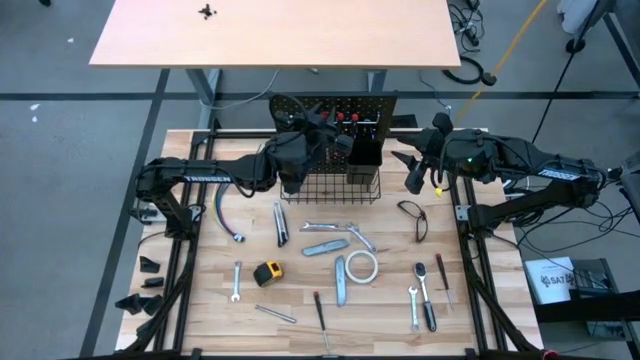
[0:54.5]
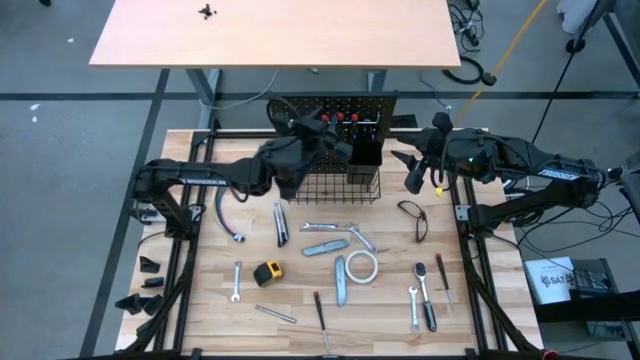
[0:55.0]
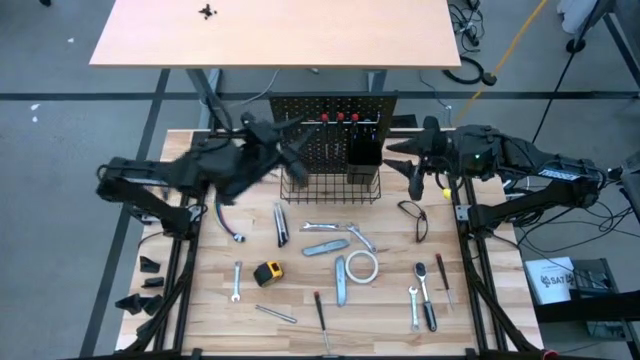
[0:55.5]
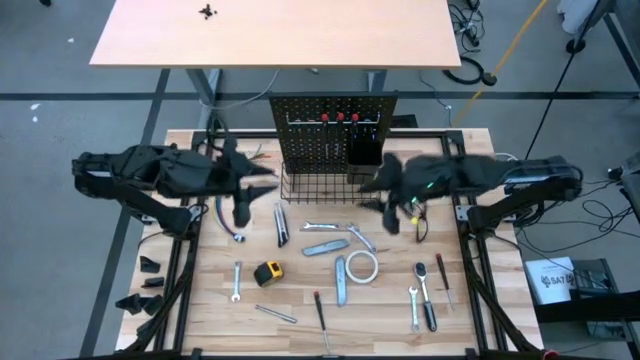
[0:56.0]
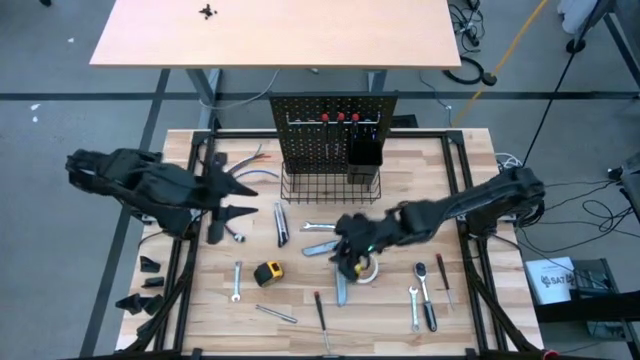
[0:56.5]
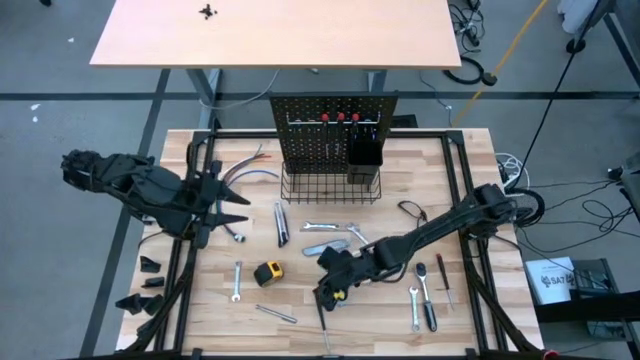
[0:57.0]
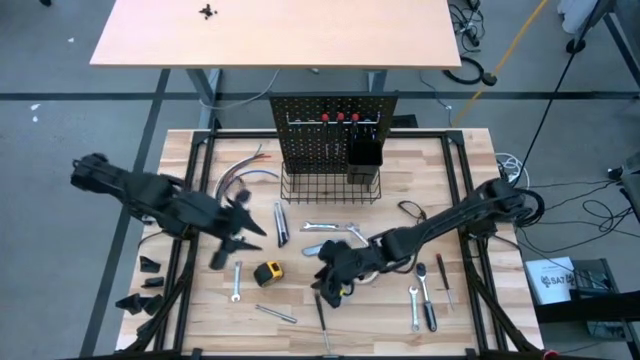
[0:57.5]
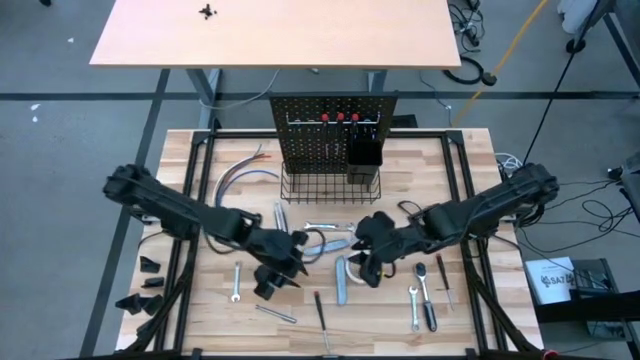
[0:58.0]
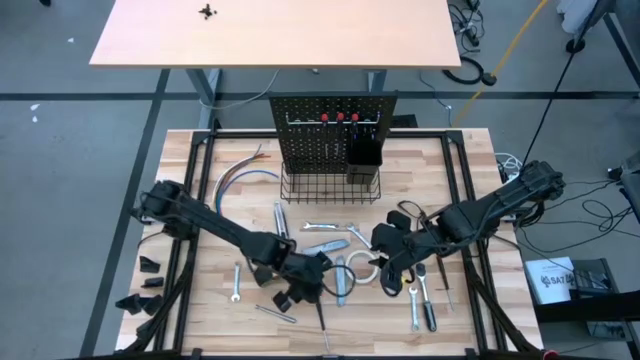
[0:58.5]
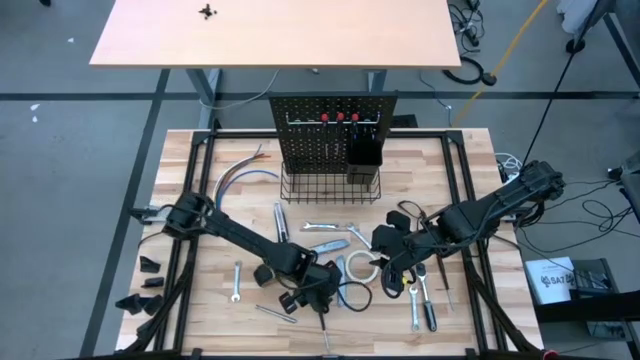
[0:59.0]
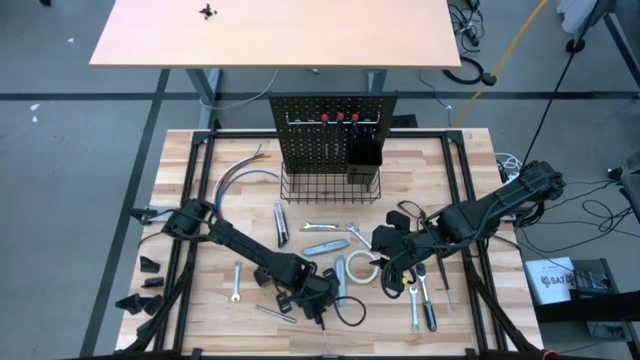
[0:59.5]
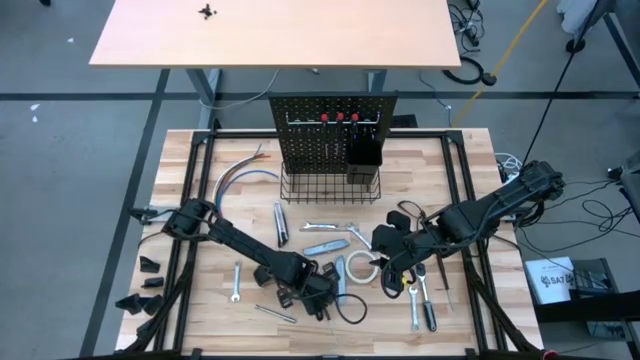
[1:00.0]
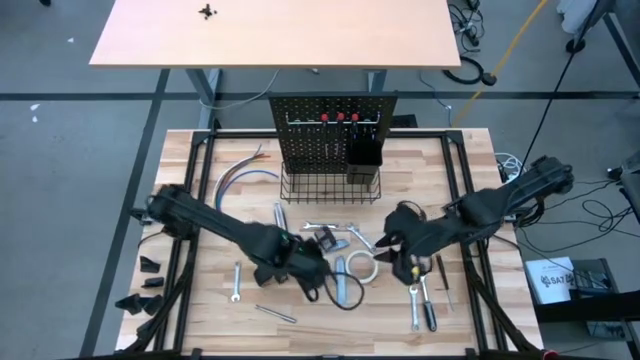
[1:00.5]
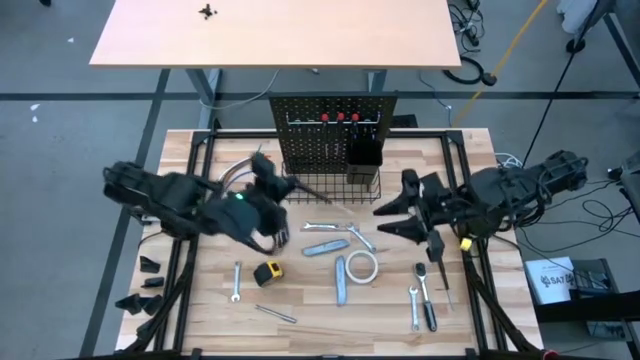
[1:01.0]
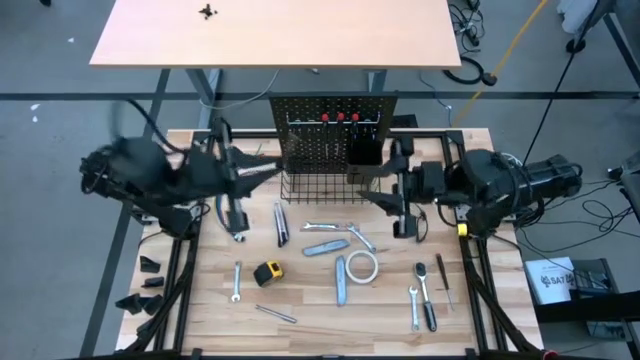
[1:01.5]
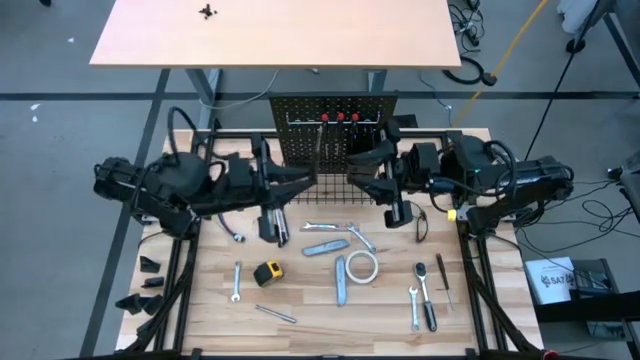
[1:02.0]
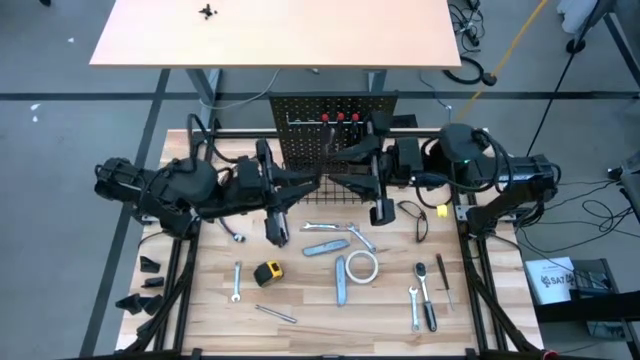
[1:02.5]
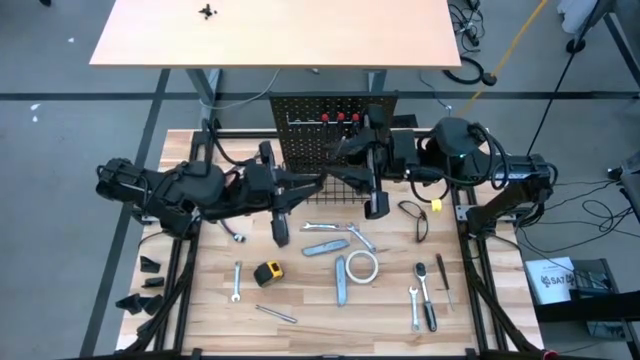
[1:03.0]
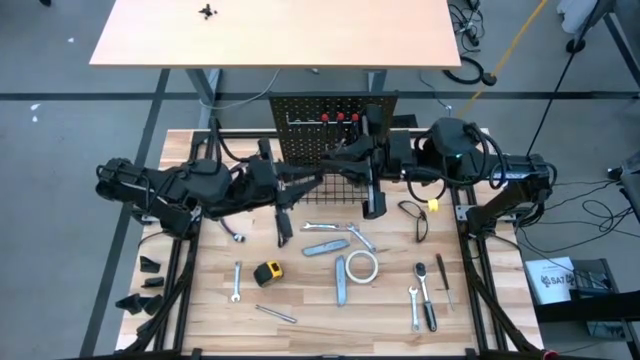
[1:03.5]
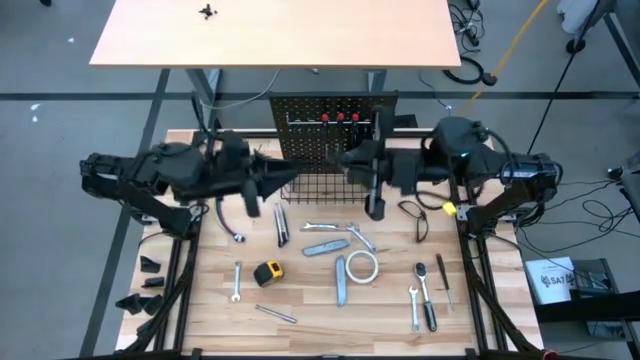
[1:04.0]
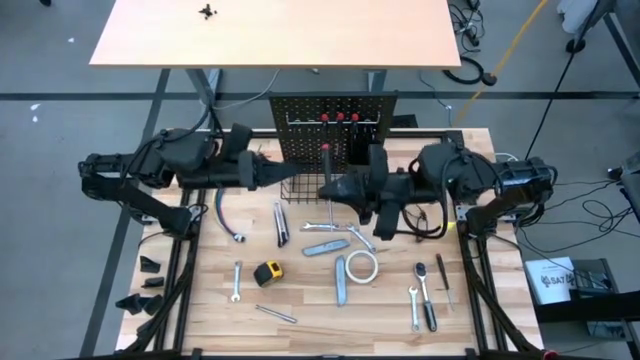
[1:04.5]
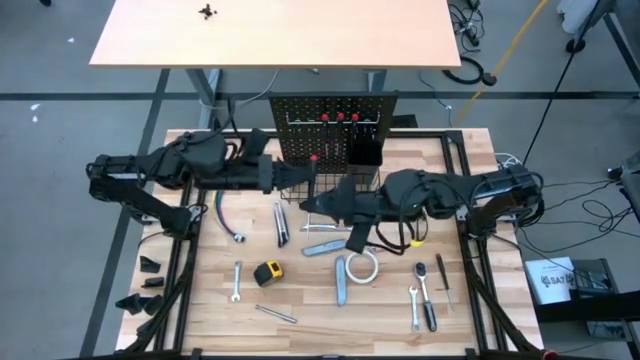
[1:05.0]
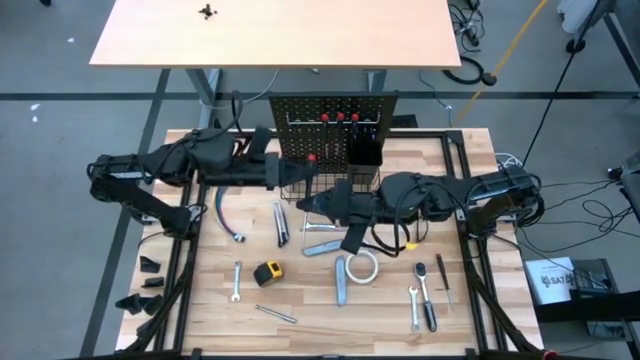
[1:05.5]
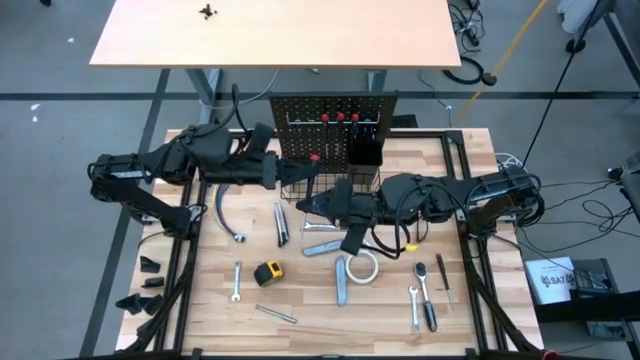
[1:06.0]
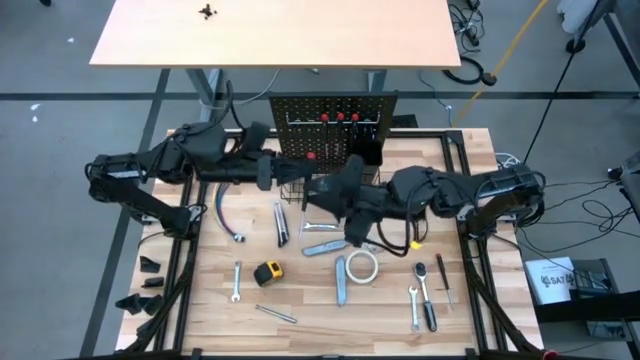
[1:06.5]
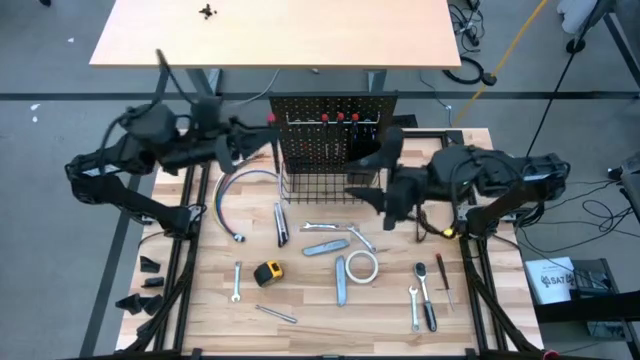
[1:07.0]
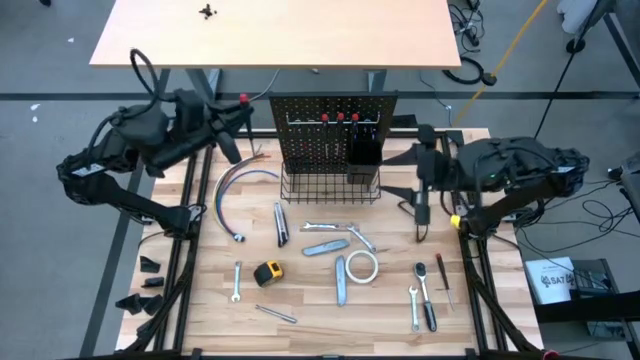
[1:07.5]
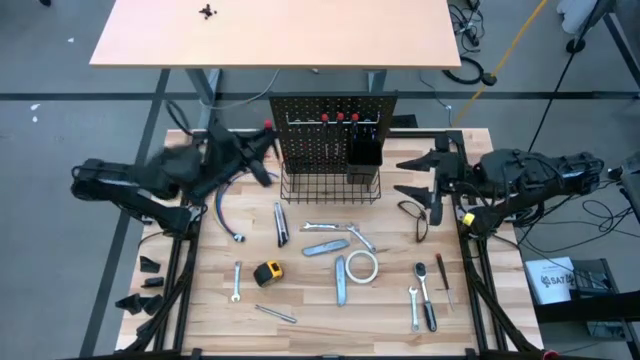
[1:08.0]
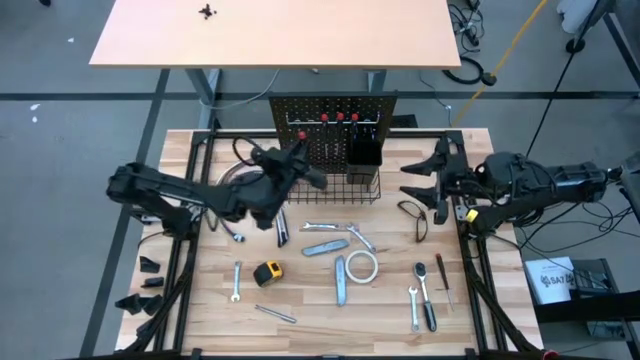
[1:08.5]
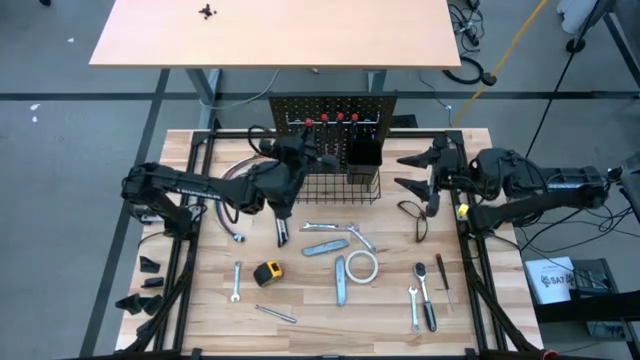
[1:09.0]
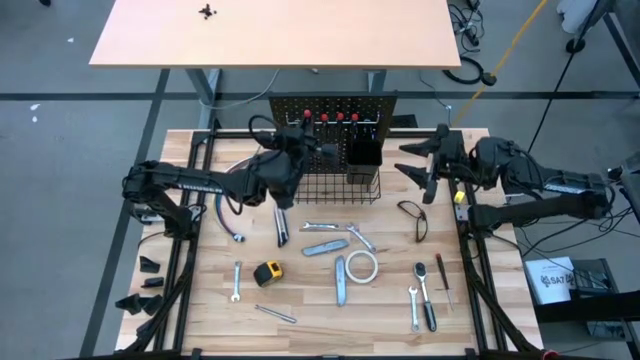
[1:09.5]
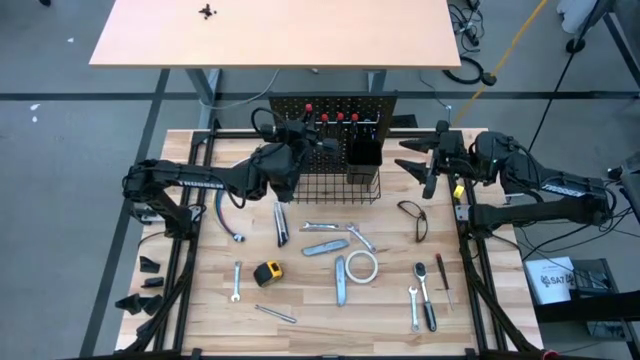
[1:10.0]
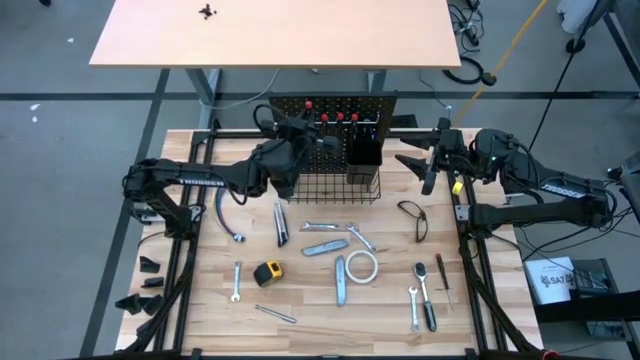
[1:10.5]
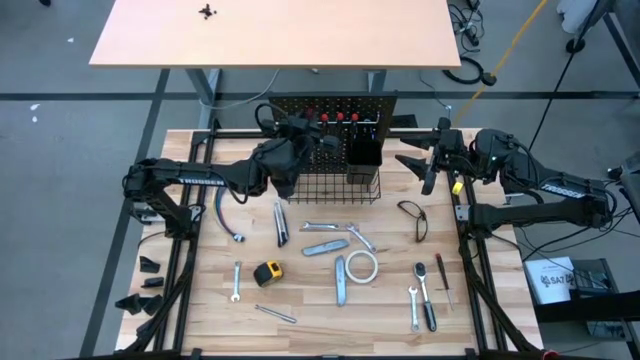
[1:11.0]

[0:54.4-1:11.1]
Task: Hang tools onto peg board
Hang the nut driver onto the pegboard

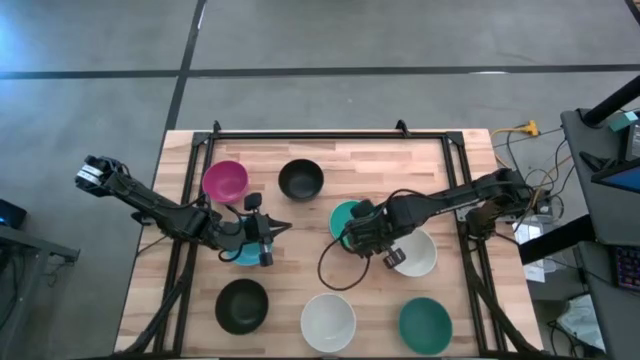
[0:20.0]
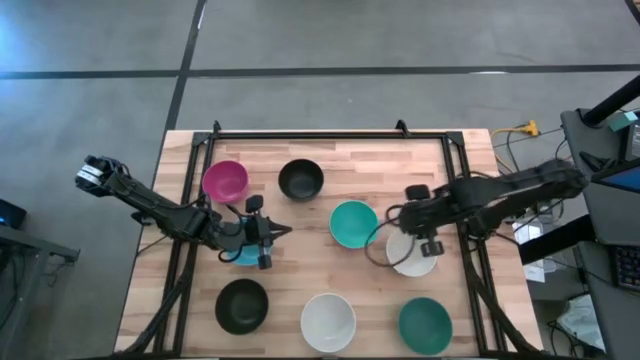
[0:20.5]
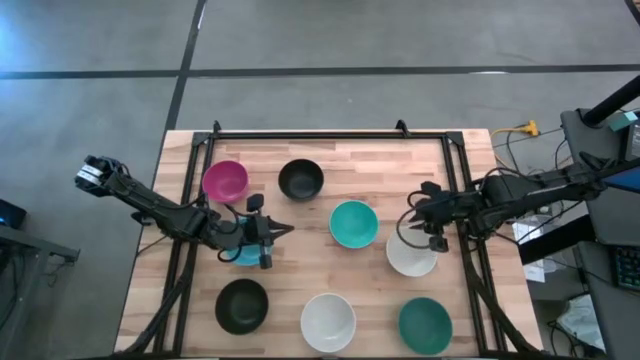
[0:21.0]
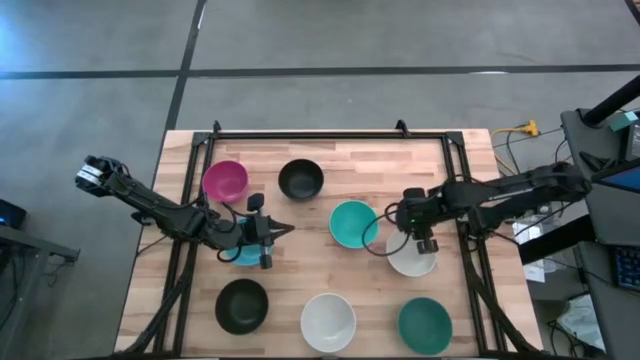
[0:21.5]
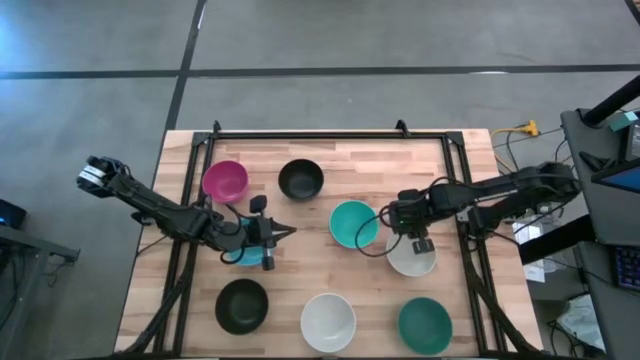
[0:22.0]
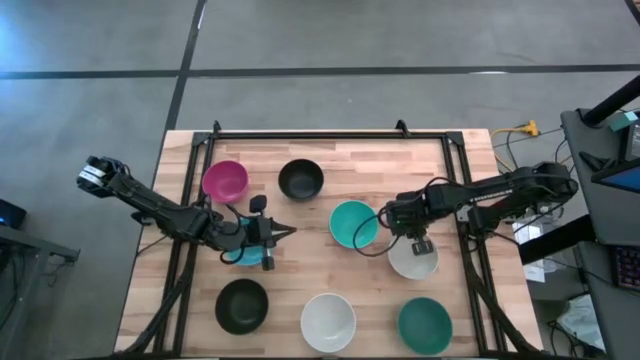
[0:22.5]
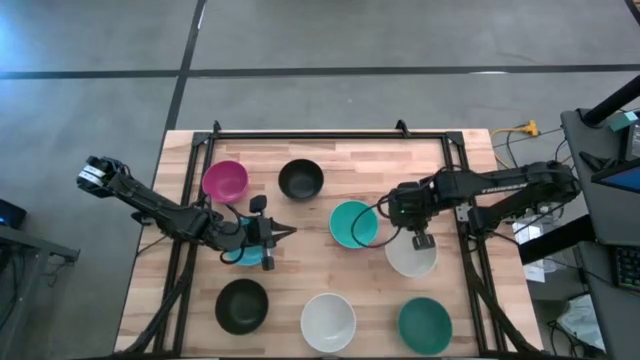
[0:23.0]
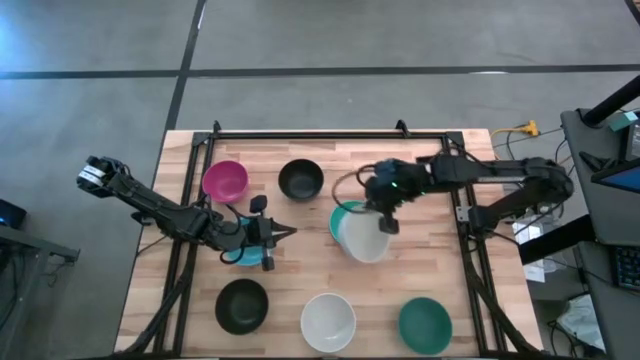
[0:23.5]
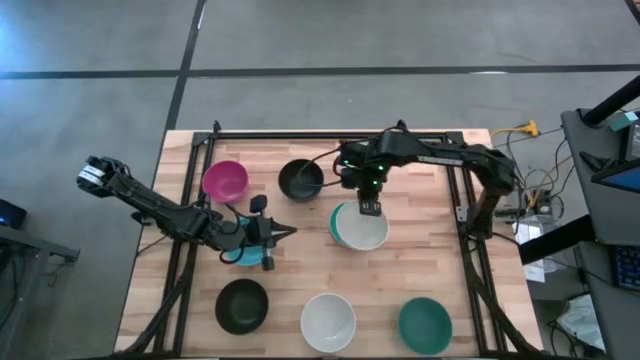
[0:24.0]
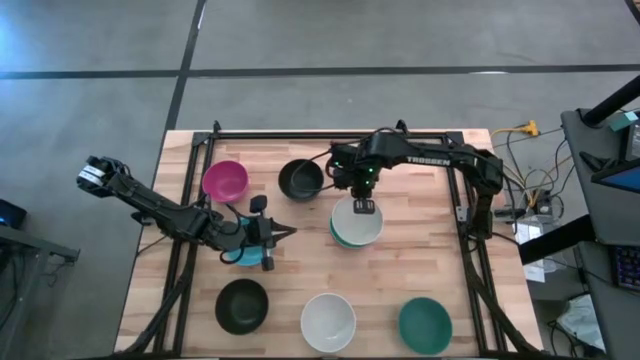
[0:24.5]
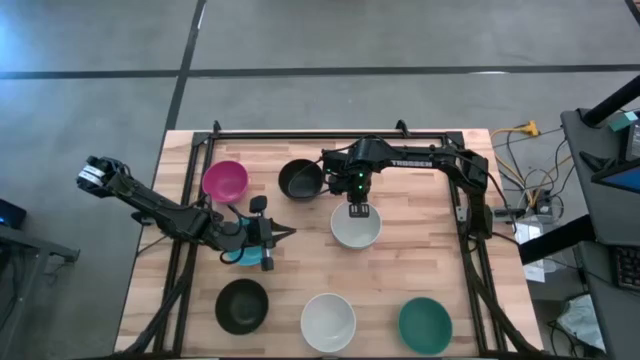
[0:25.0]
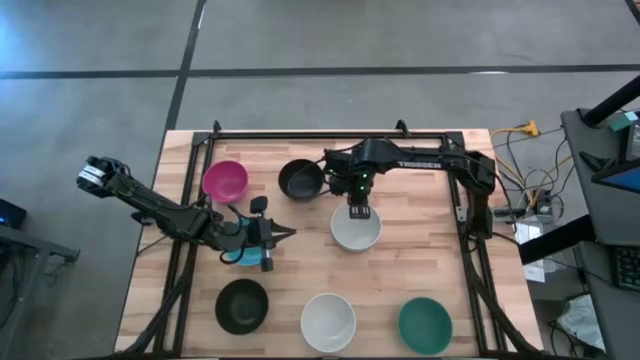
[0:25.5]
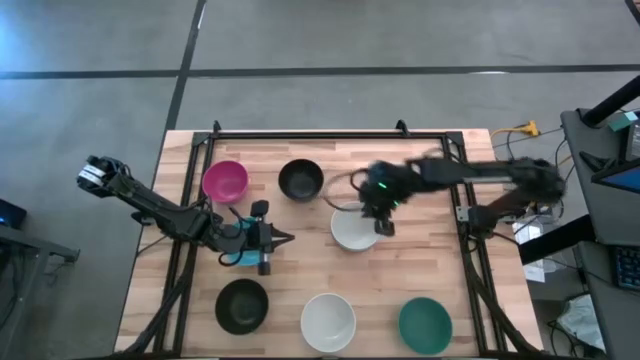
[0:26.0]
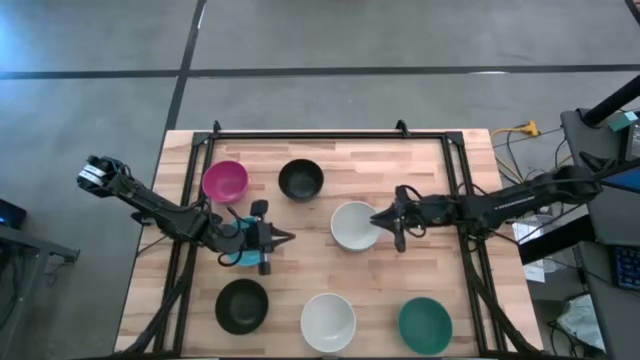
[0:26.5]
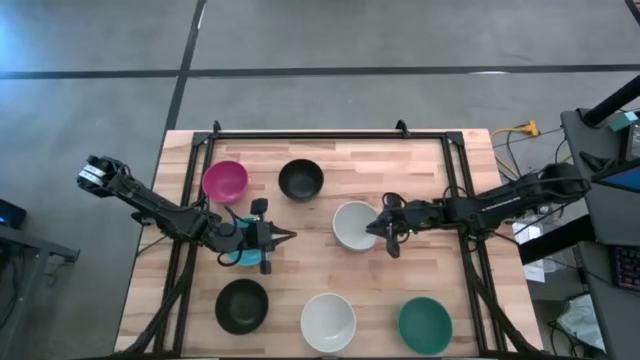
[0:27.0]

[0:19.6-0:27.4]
Task: Nest bowls inside each other
Stack the top white bowl on the blue bowl
